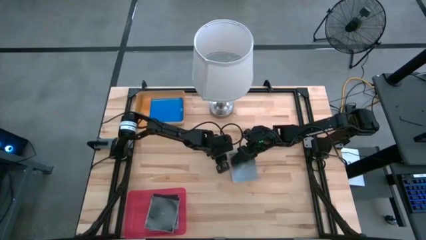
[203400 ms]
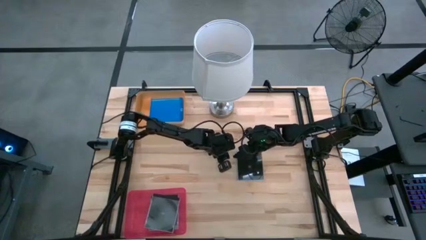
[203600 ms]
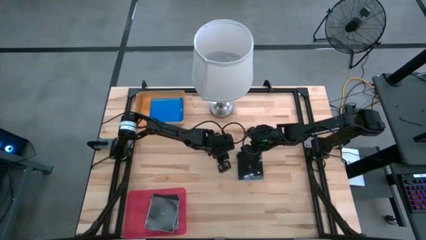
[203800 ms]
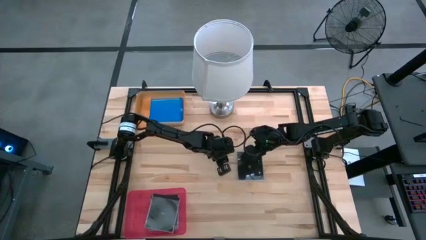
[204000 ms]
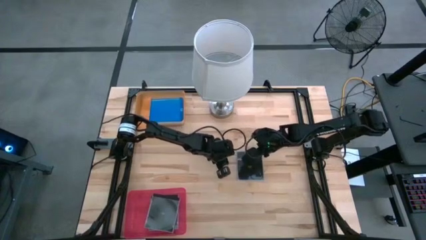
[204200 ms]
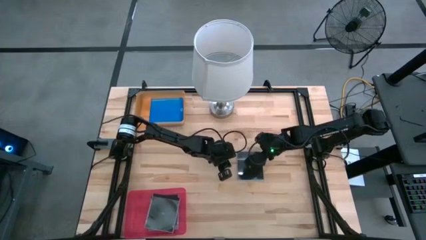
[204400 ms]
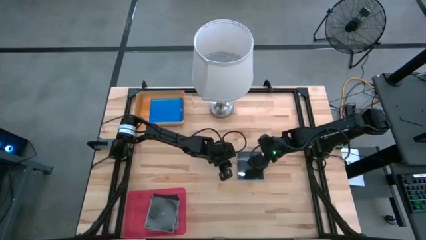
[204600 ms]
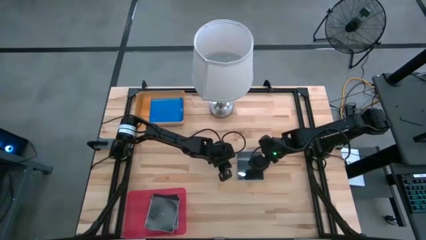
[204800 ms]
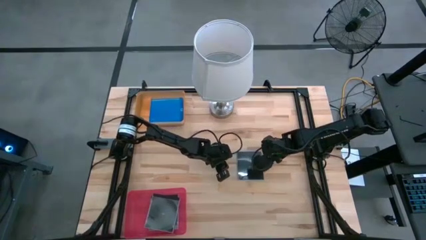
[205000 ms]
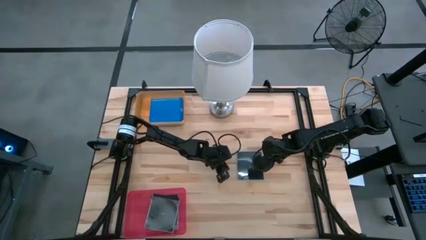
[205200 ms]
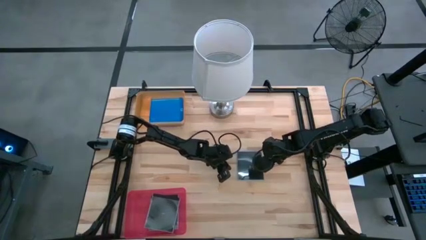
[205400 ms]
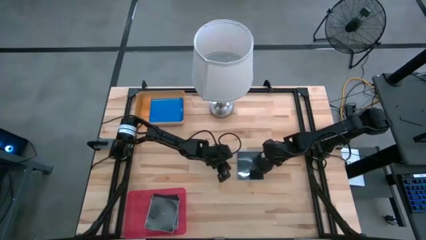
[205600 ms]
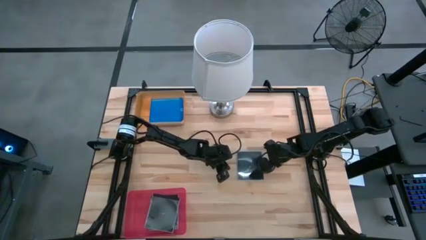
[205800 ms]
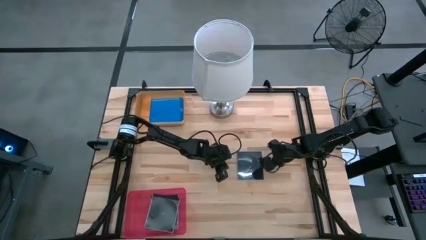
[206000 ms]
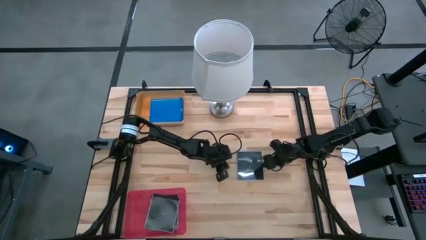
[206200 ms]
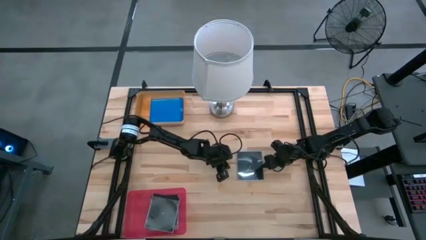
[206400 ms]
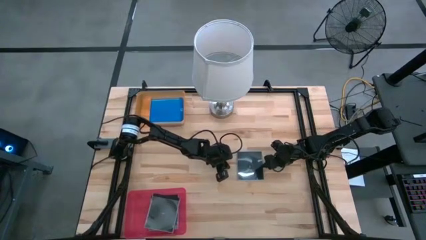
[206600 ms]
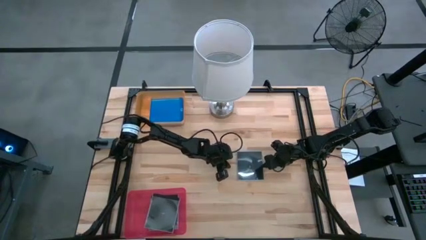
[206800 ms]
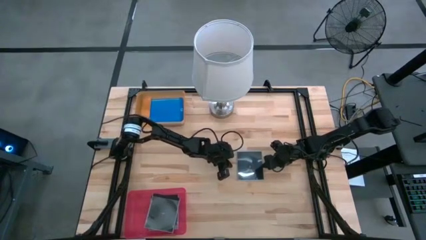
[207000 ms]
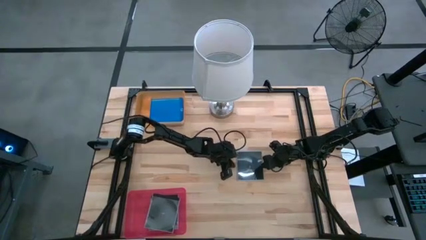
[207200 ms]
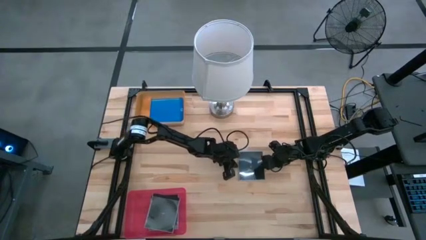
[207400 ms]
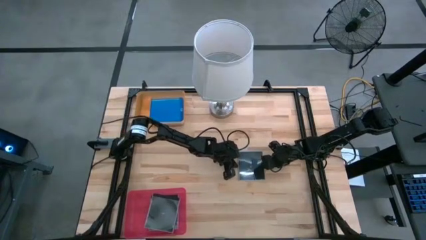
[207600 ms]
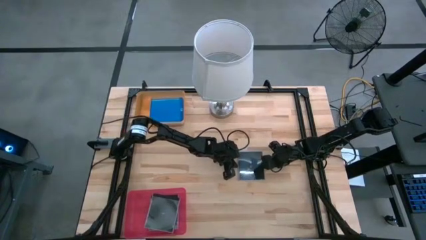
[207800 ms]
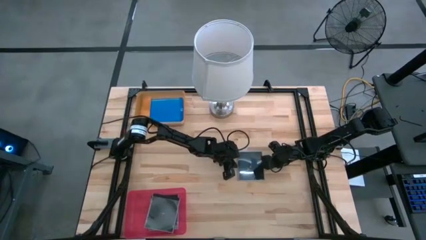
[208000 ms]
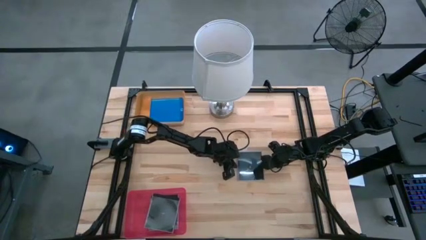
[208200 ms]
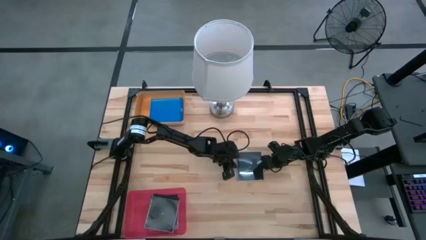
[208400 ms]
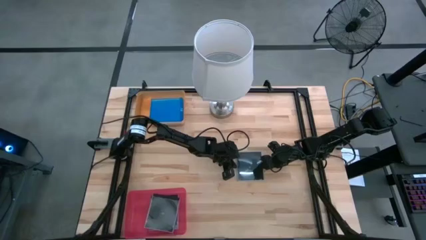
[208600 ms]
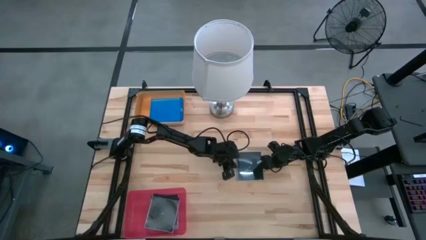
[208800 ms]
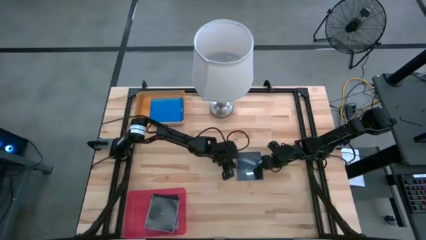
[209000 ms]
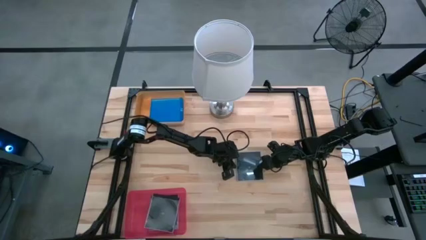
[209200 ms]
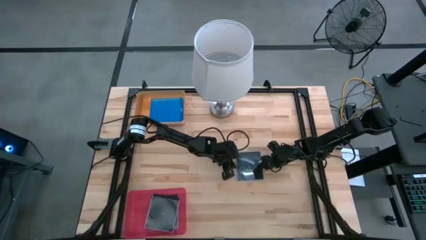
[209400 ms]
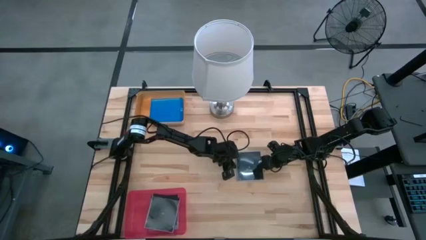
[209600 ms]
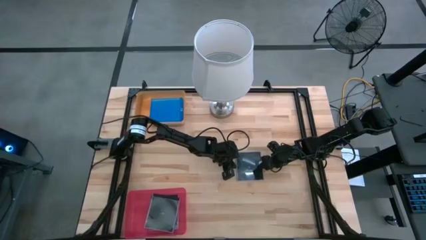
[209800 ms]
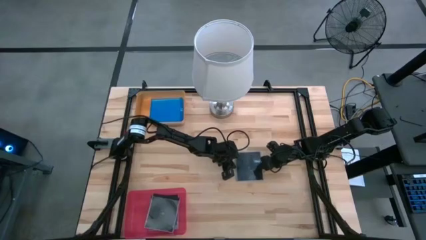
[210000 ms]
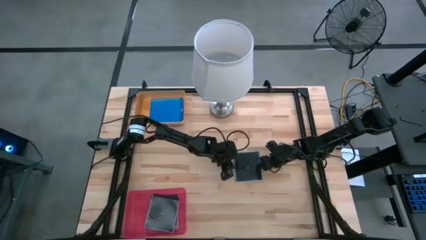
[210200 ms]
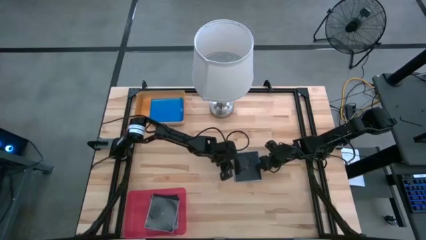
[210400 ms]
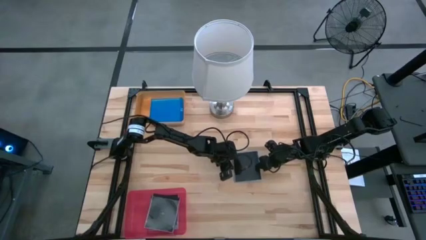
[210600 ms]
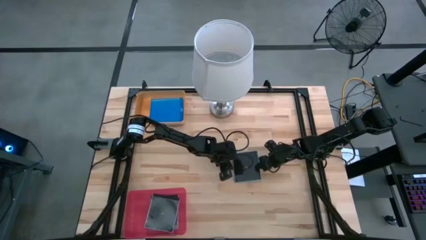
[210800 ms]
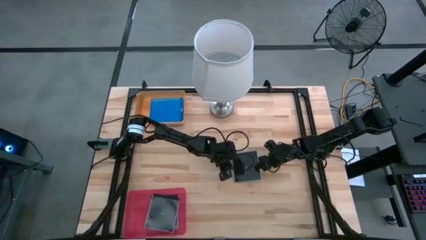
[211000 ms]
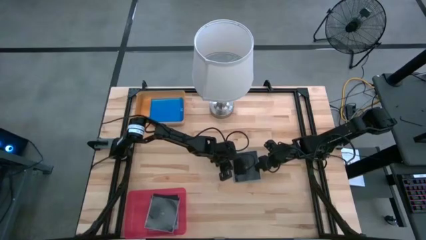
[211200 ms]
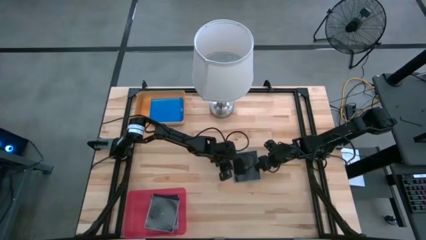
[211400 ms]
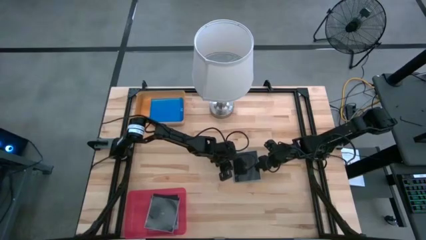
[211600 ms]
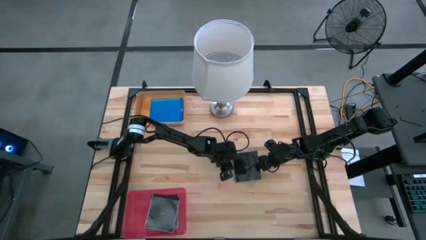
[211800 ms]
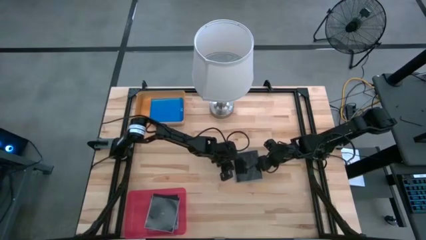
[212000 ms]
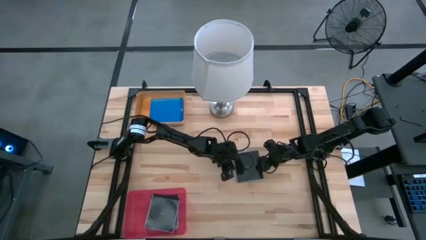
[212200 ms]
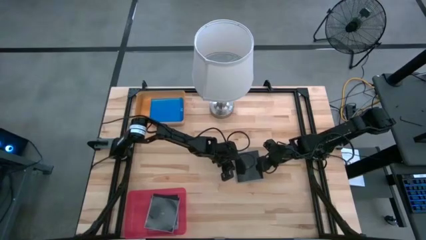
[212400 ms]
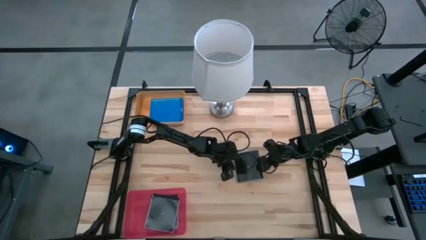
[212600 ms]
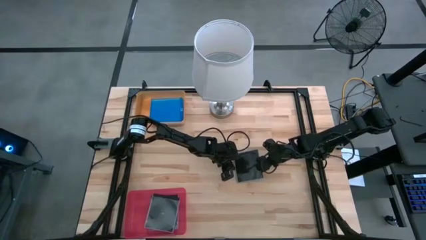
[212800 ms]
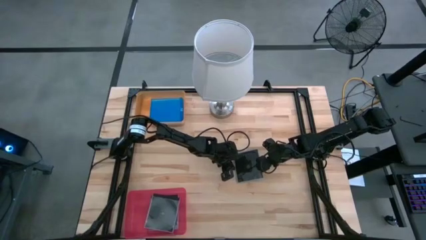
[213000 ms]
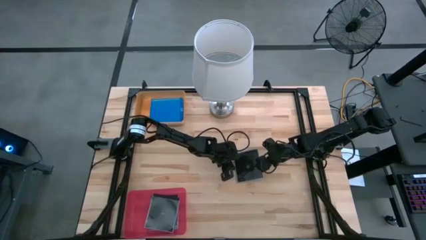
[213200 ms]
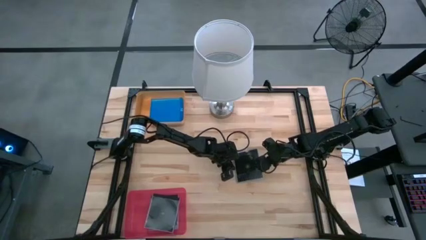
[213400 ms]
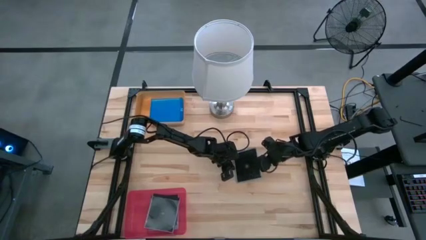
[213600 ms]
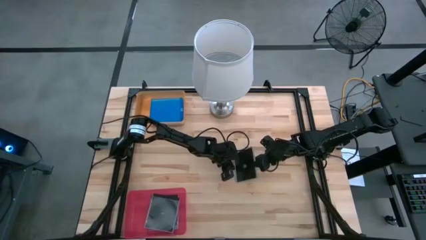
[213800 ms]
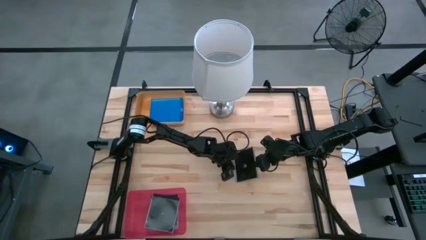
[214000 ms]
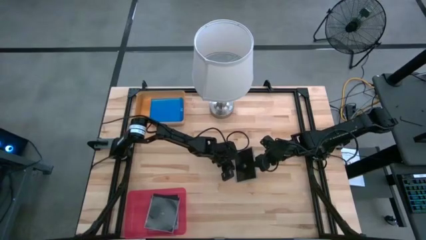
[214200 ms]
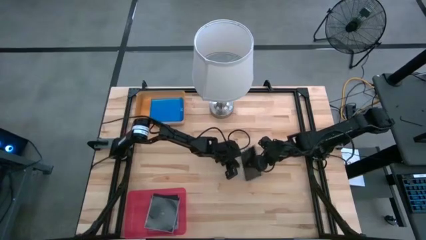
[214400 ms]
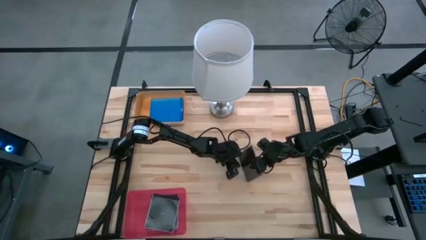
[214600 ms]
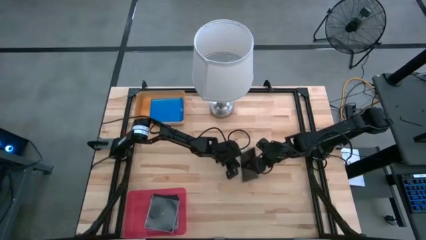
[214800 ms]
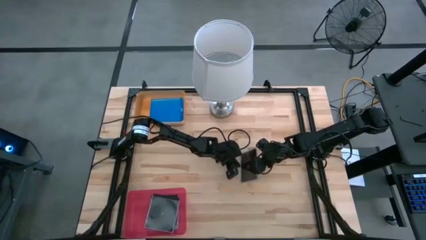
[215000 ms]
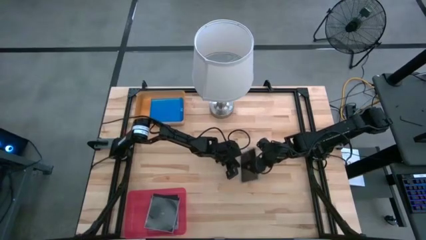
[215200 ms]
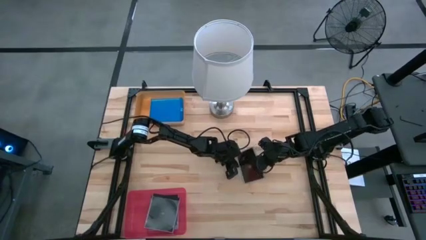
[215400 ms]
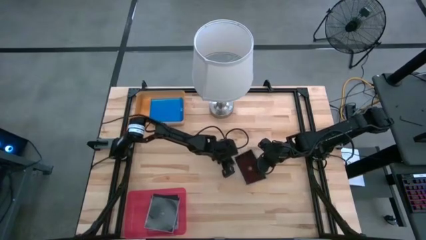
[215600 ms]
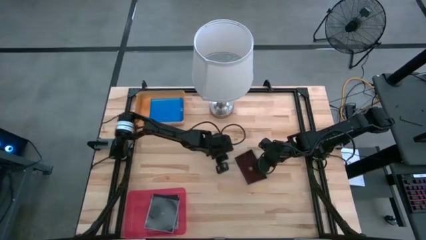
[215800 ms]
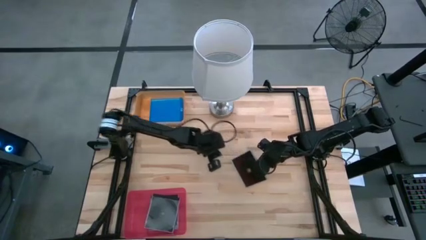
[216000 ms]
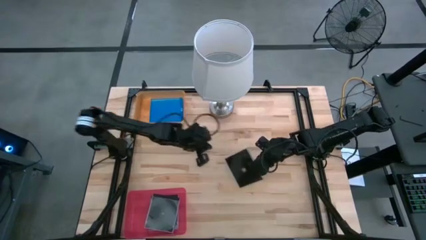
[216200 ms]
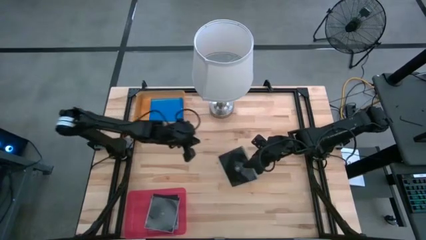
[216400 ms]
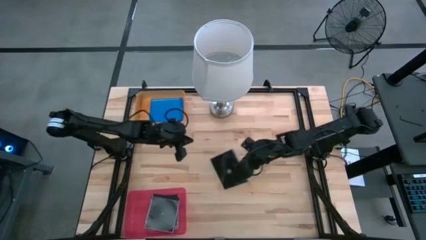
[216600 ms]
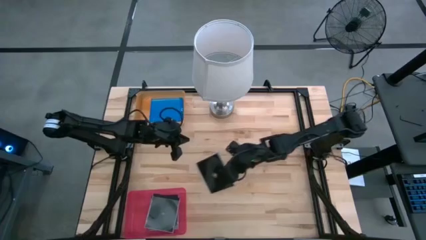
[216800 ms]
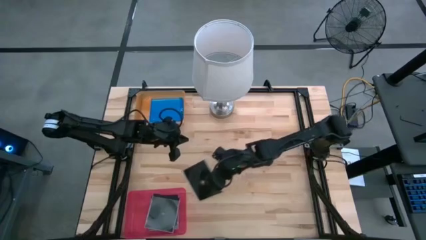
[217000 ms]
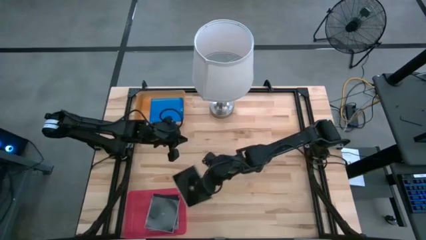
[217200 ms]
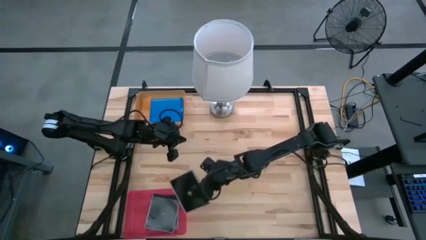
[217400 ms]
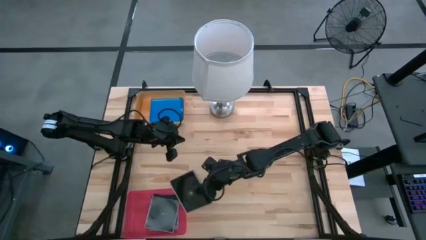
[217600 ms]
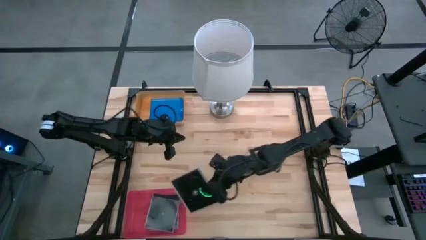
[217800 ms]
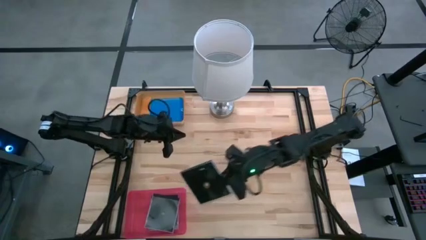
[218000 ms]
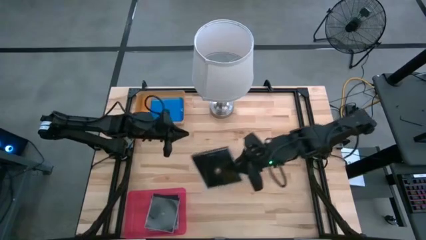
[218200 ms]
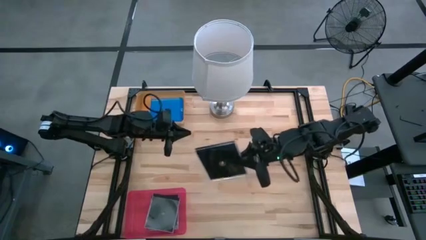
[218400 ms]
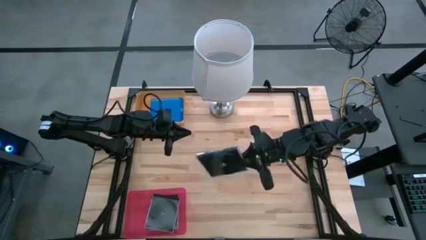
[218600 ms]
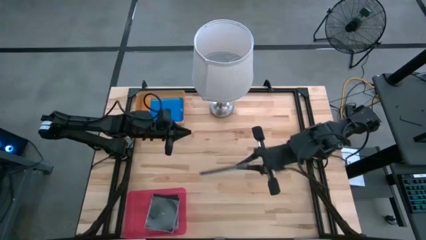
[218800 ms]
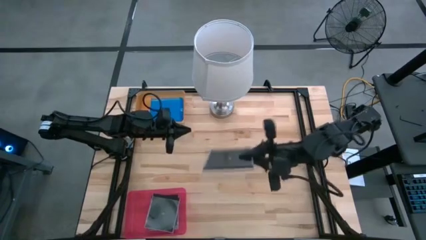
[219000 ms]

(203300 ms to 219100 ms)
Task: Pick & place jewel cases by type
Put the black cd case into the pink bin
